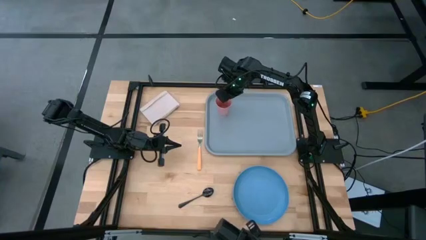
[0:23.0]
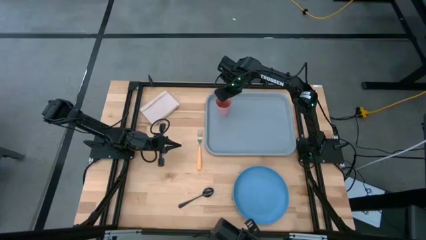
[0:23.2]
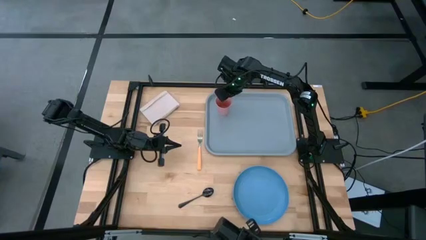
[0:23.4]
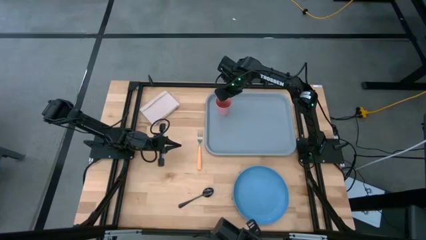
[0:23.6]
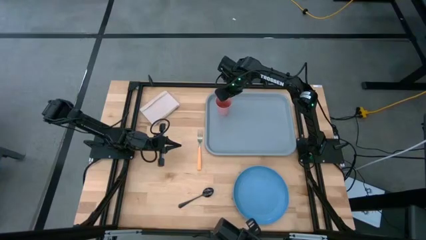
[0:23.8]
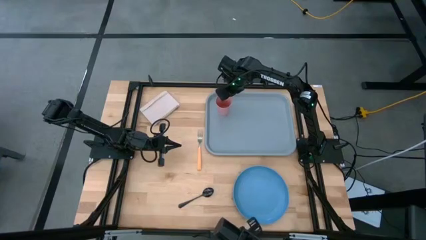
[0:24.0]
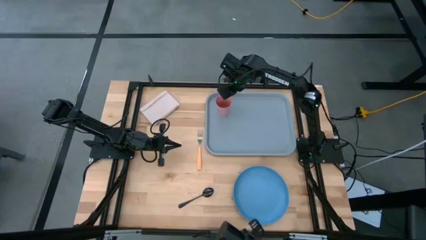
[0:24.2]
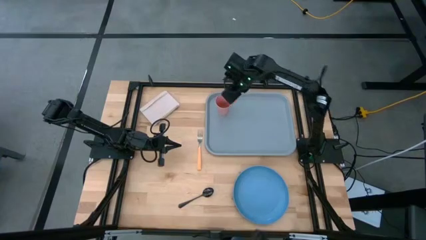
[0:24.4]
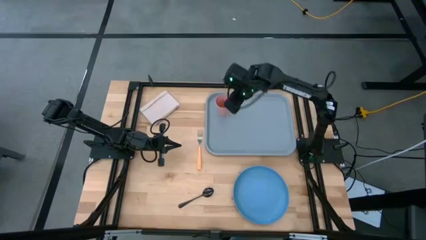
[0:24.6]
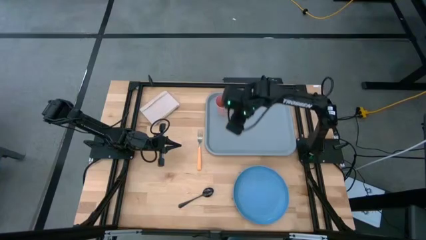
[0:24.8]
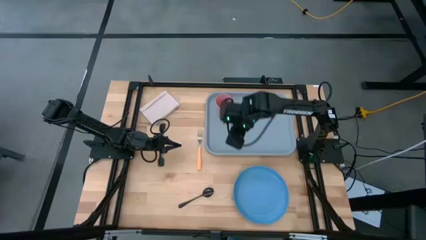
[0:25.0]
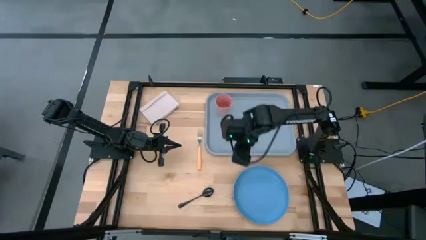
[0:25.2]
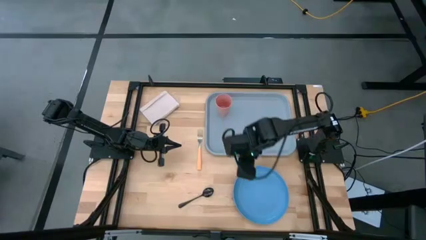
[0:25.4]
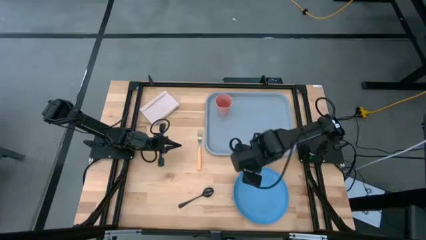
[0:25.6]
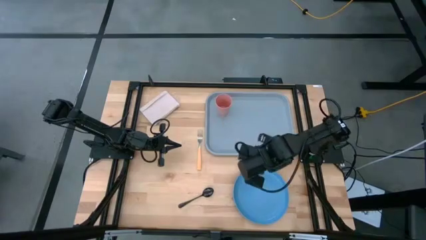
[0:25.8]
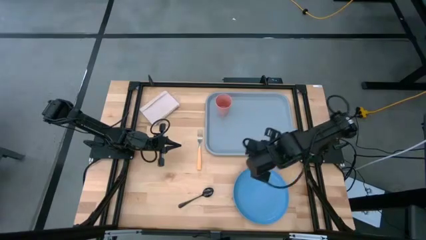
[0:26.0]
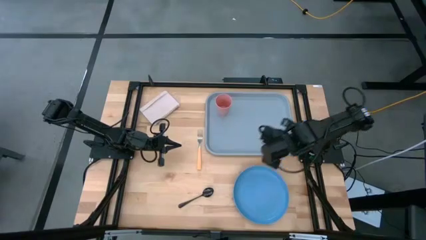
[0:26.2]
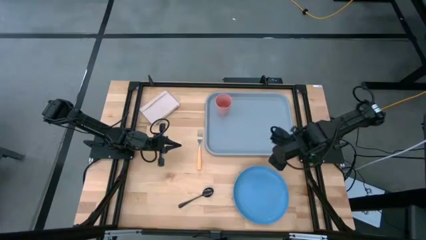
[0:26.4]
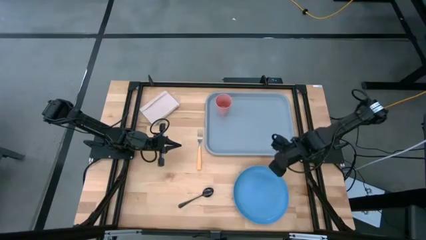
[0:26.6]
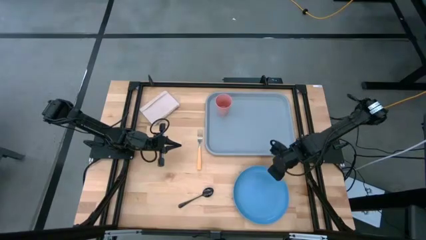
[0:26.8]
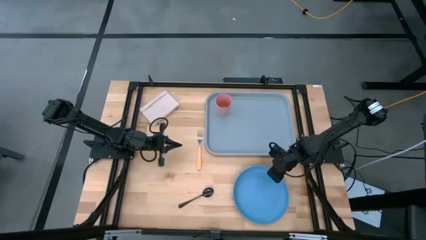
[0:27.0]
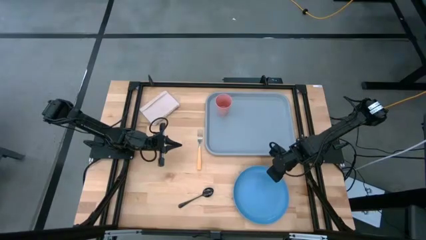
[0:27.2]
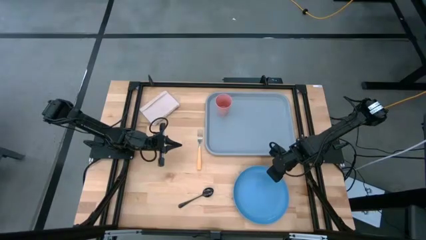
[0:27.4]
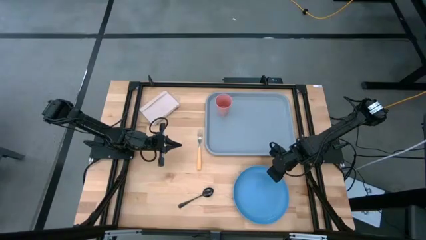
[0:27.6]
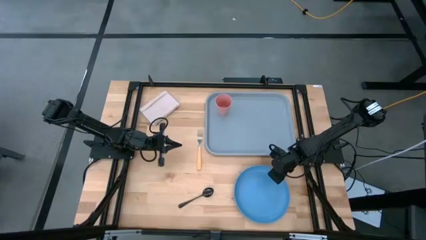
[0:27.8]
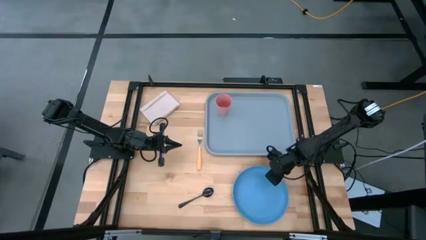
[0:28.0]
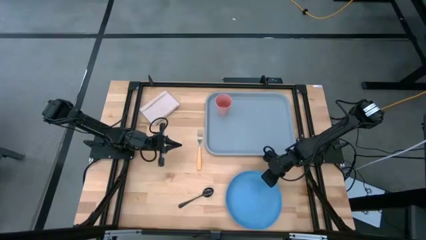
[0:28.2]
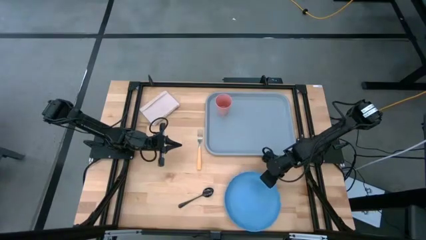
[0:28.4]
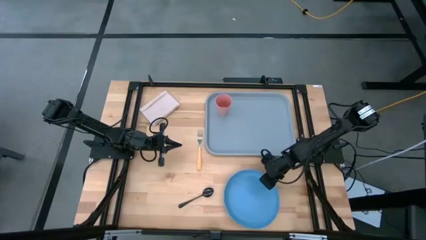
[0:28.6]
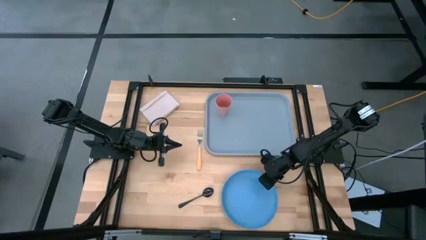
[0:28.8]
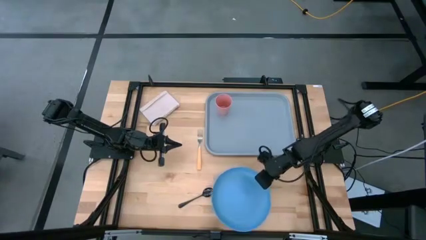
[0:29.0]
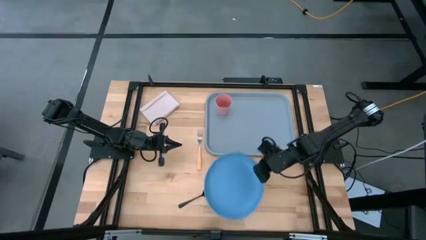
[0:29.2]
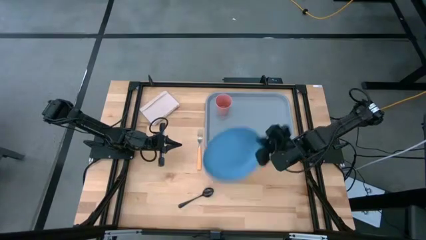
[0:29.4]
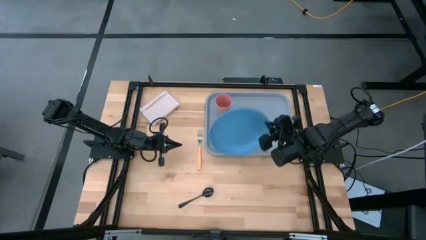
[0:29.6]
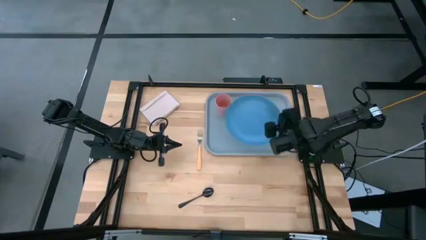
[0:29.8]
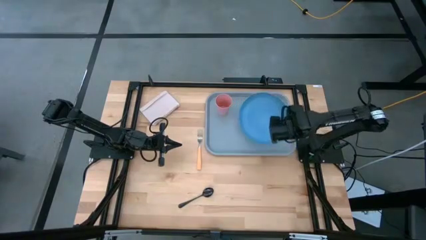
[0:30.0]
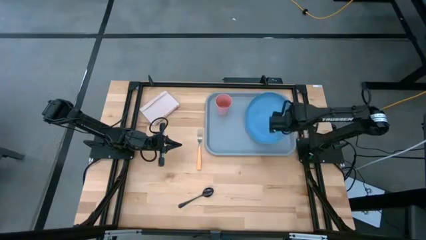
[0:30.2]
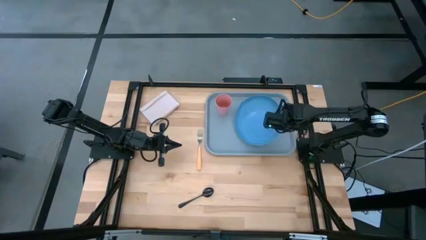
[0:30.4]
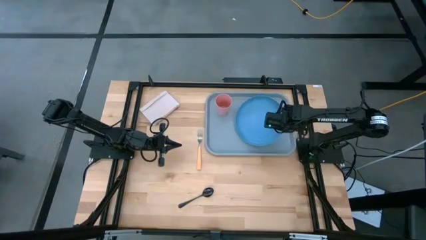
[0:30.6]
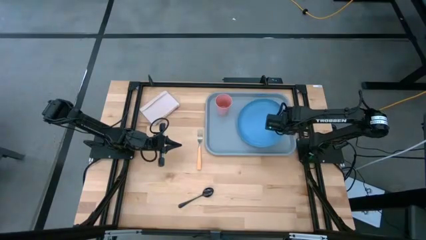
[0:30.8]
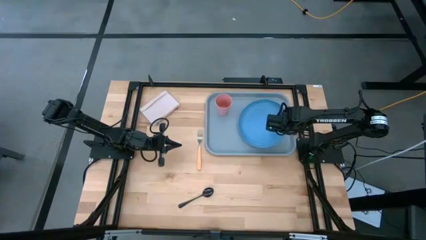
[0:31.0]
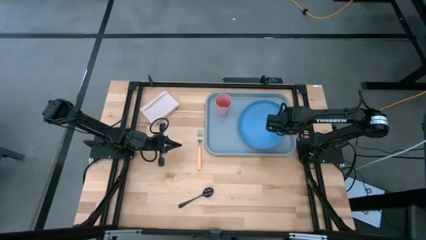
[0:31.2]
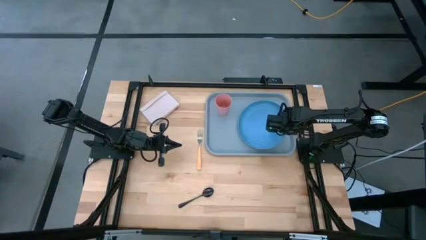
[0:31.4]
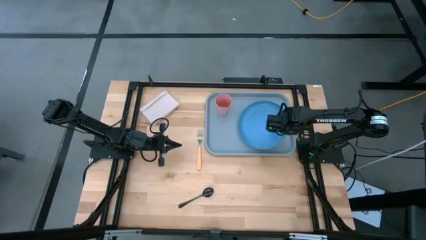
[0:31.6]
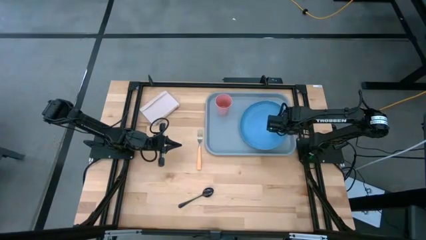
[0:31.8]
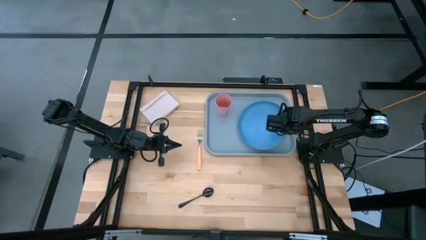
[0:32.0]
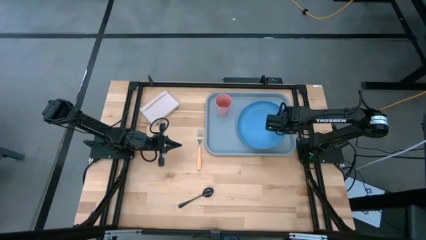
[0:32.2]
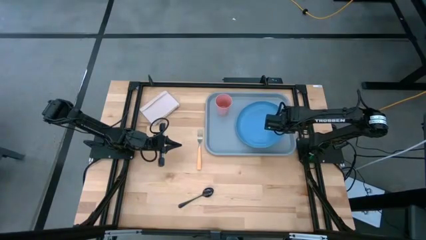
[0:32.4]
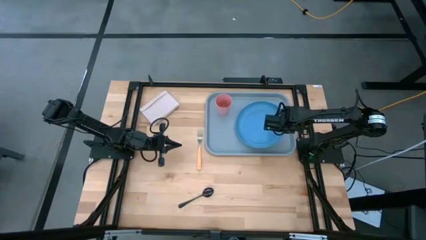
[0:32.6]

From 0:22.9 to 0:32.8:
Task: Pick and place plate/cup/fork/spoon on tray
Put the blue plate on the gray serving tray to the bottom right of the pink cup

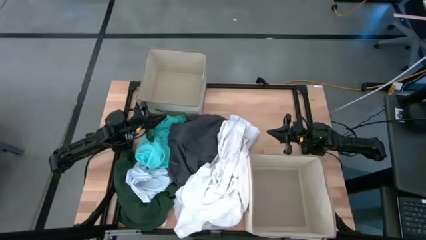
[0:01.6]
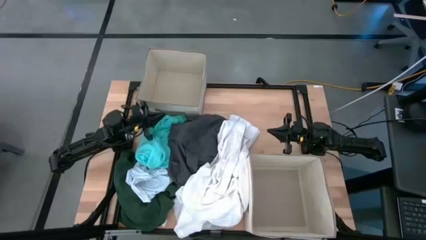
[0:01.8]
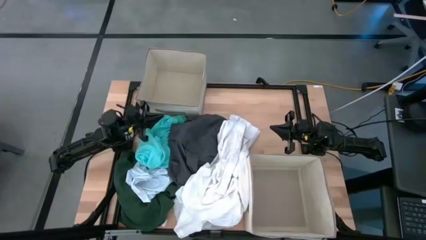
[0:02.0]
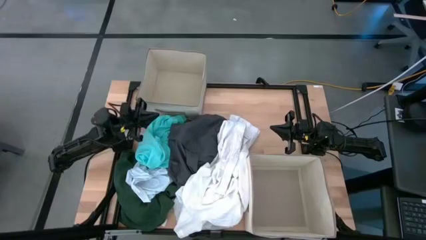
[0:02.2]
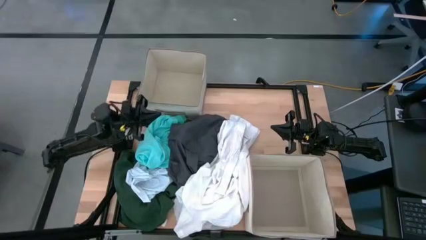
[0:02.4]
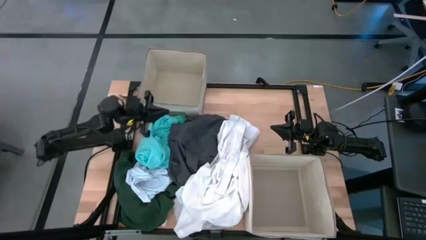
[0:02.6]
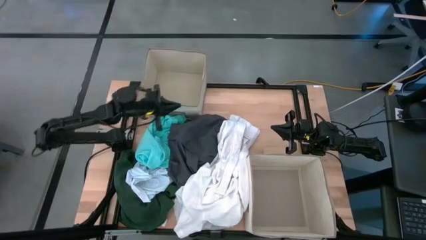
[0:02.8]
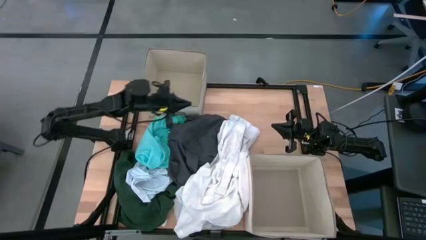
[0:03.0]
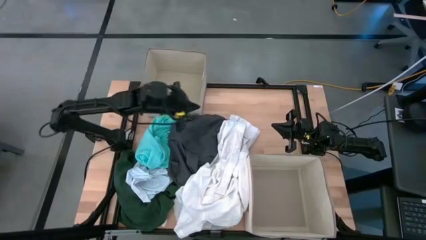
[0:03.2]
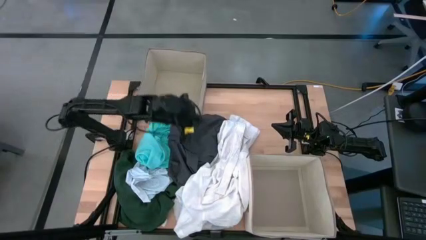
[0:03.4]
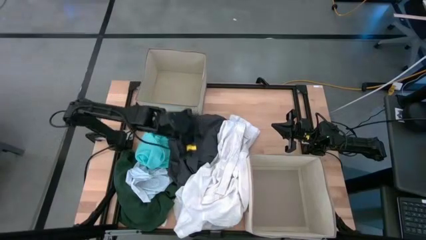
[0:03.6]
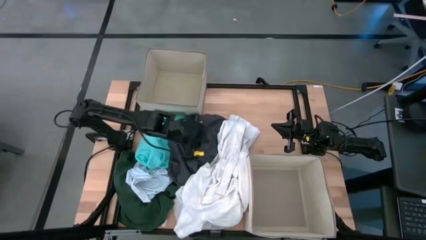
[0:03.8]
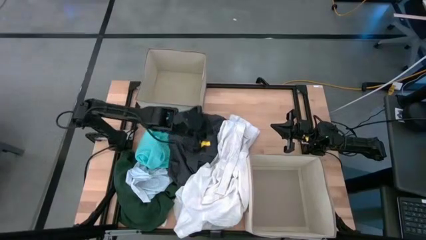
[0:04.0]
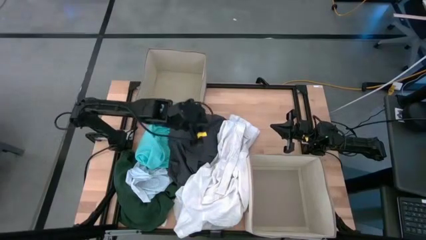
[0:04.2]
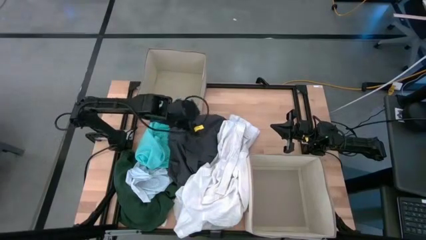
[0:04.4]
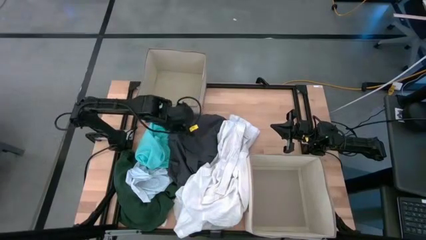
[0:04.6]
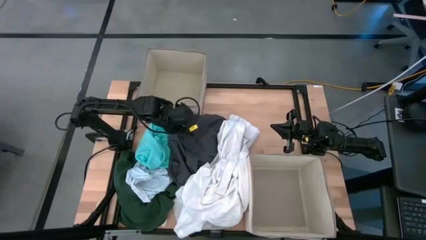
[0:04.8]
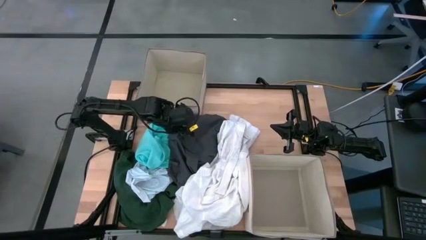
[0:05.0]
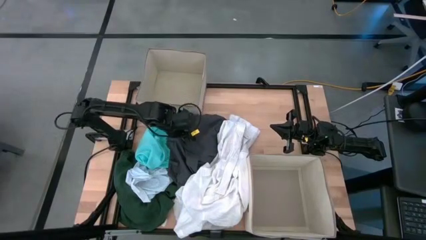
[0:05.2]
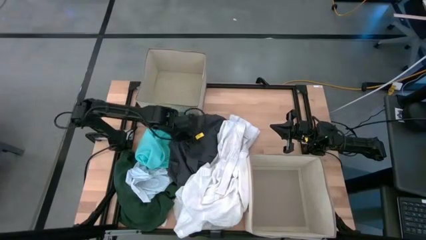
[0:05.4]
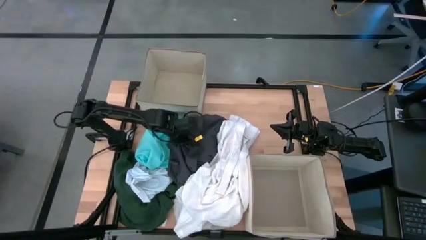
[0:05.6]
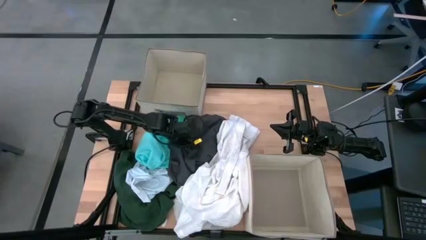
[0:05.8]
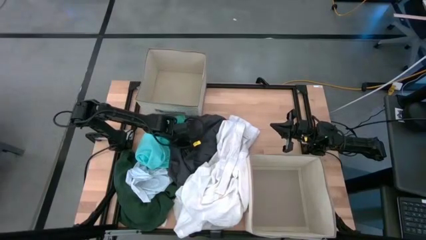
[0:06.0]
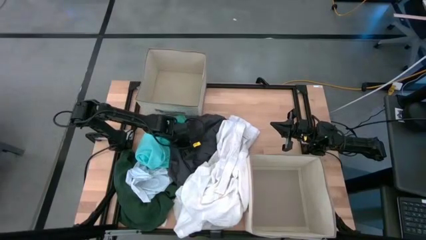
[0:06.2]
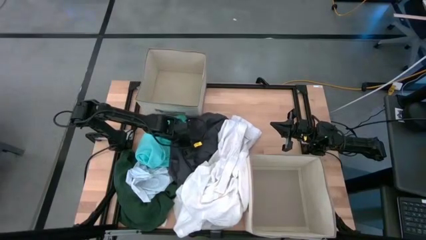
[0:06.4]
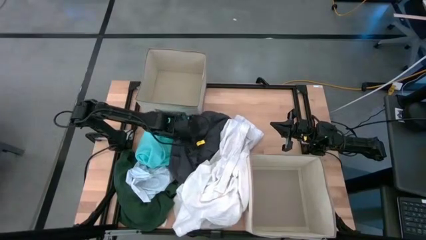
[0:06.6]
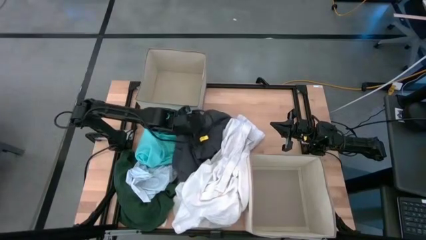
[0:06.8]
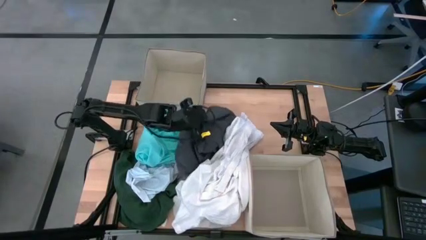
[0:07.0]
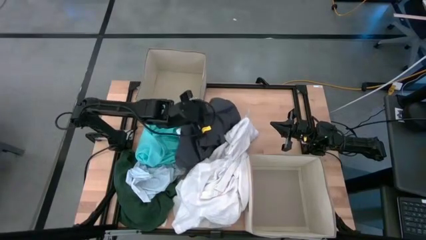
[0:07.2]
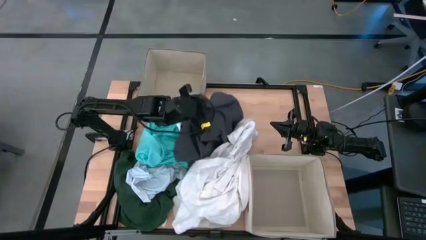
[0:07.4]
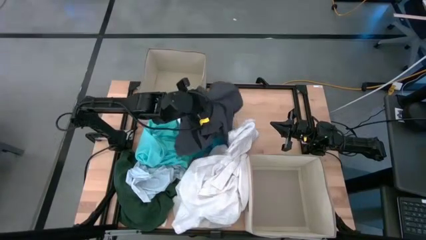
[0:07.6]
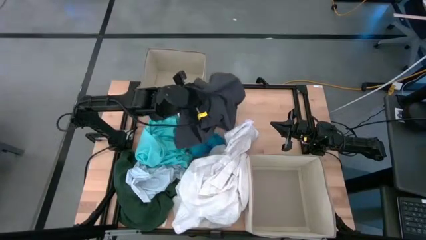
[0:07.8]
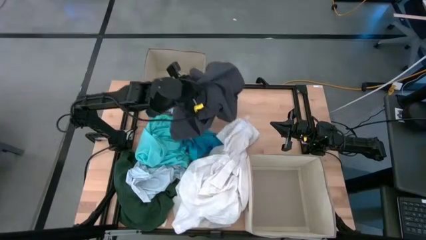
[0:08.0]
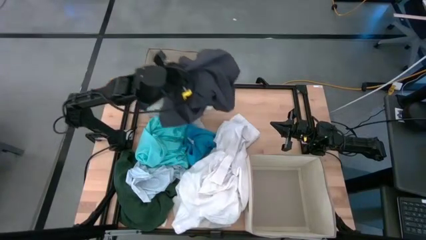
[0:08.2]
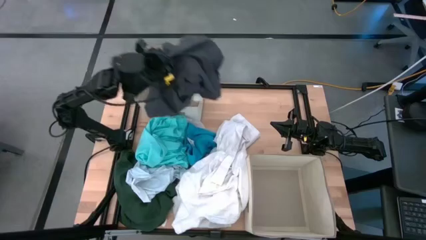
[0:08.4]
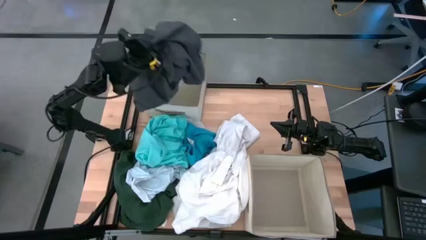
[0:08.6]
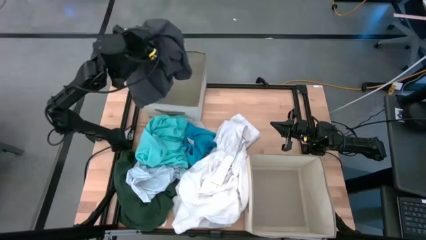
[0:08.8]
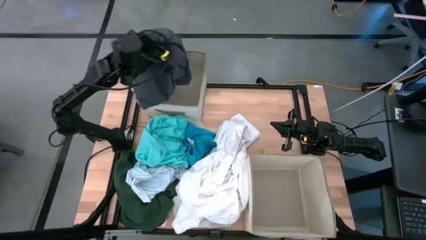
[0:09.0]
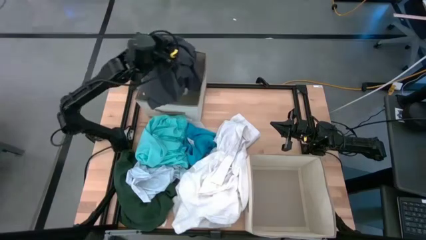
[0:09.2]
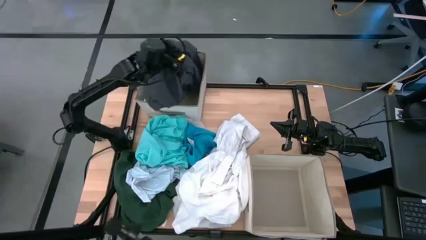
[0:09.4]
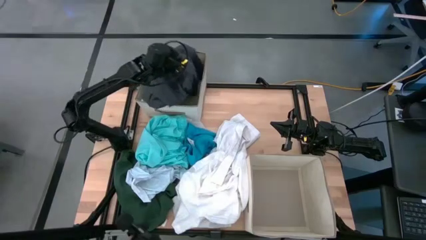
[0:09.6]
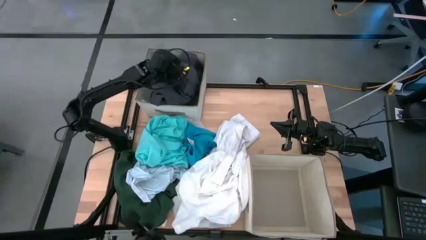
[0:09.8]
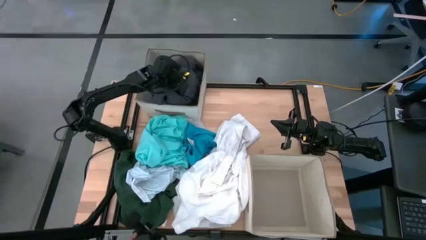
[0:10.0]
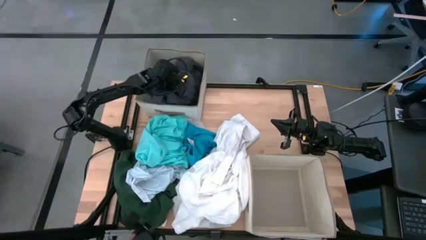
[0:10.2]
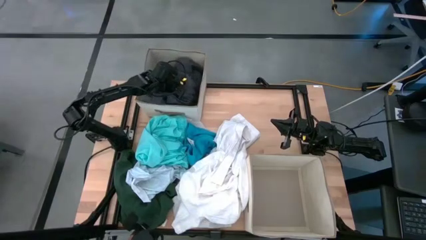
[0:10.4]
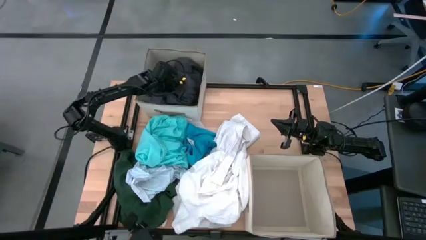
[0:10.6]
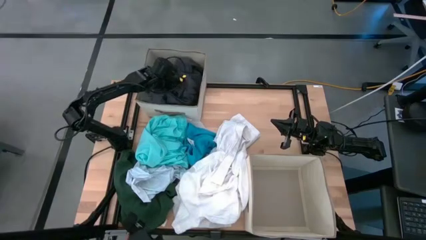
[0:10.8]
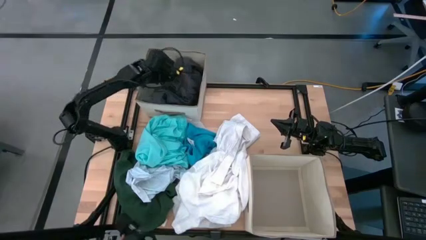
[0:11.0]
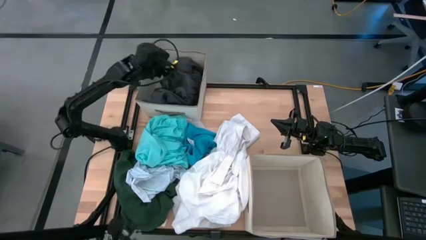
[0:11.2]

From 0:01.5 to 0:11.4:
Task: Sort clothes
Put the gray shorts into the top white laundry bin
